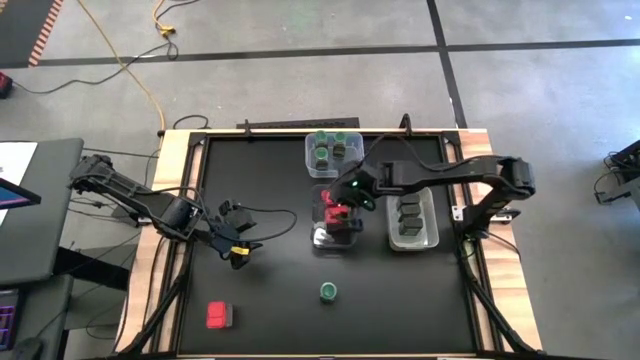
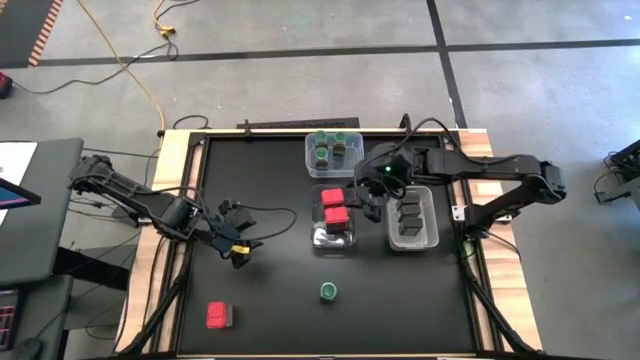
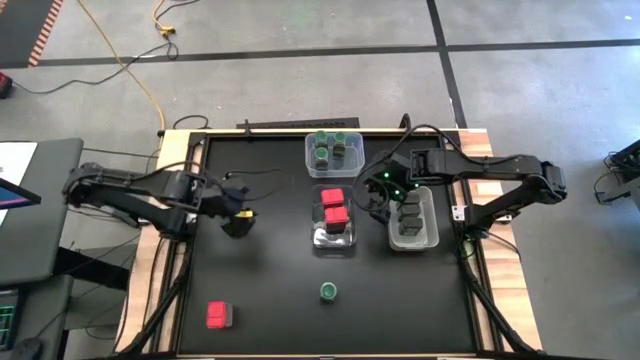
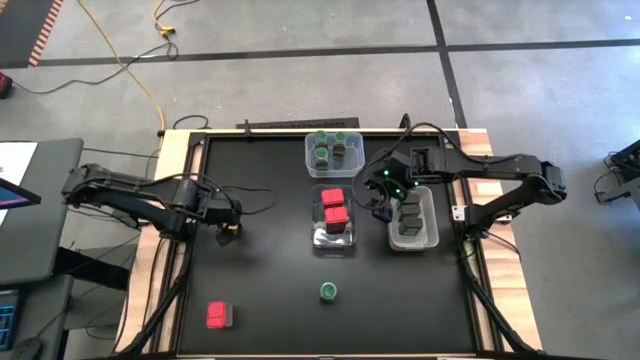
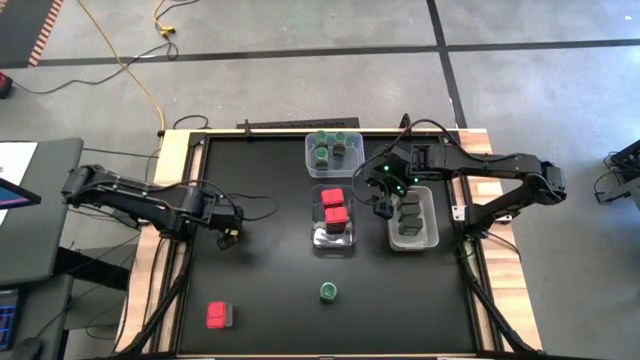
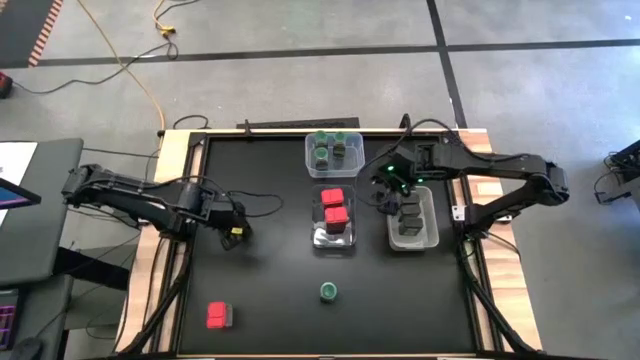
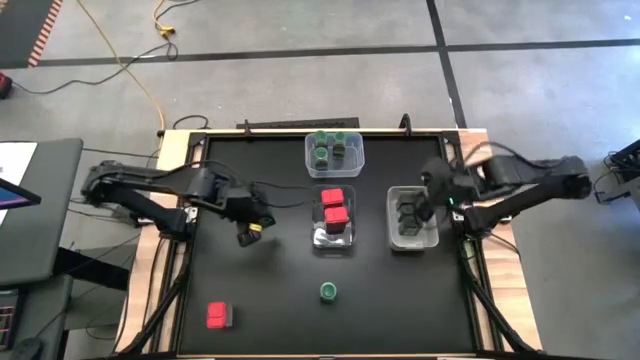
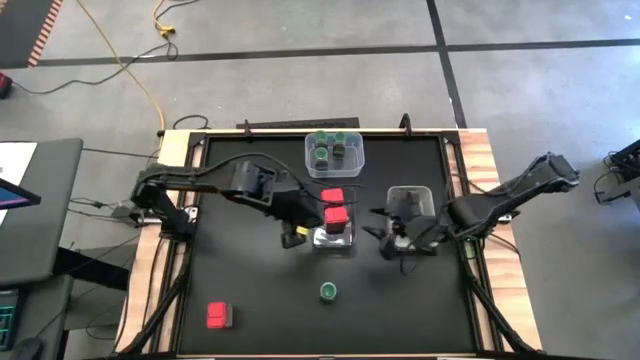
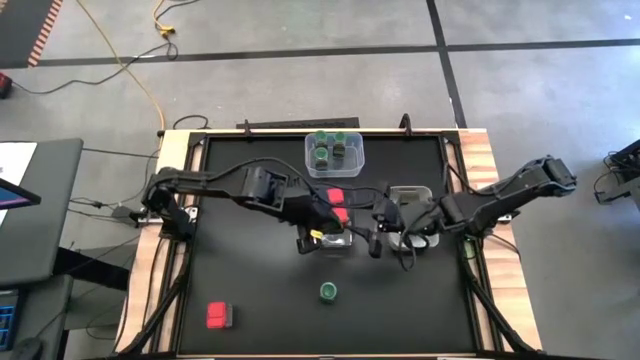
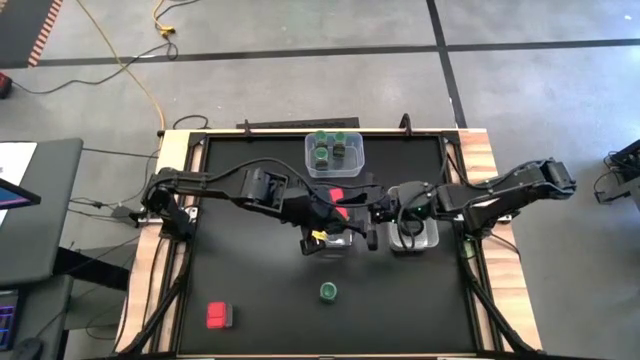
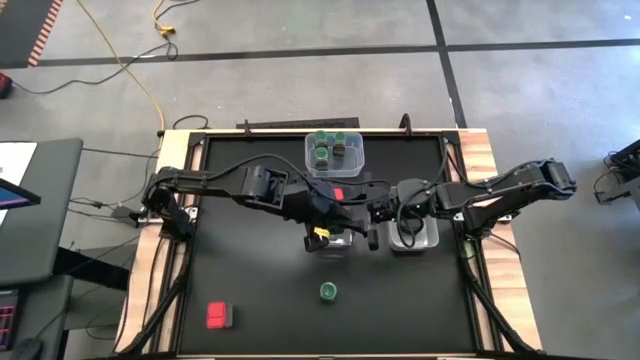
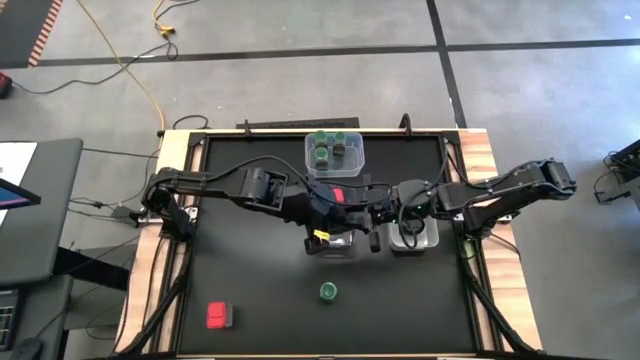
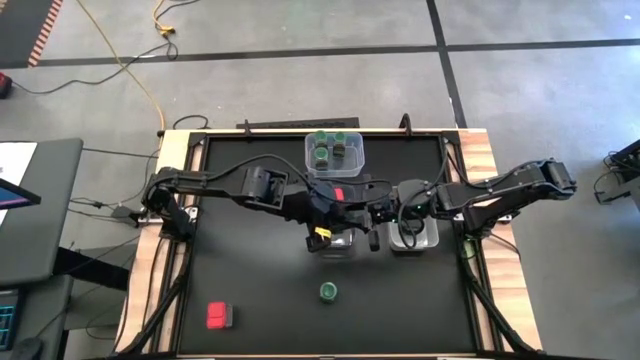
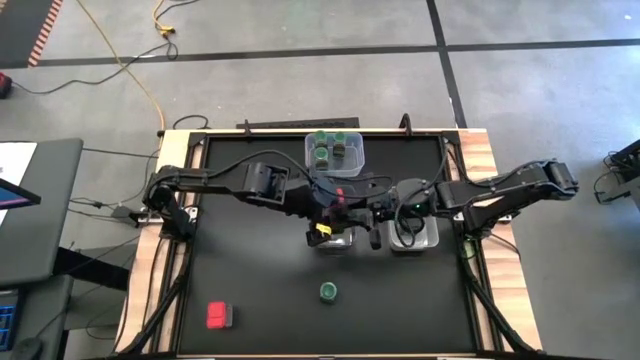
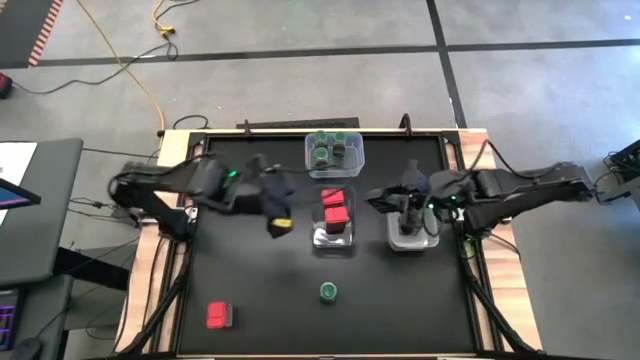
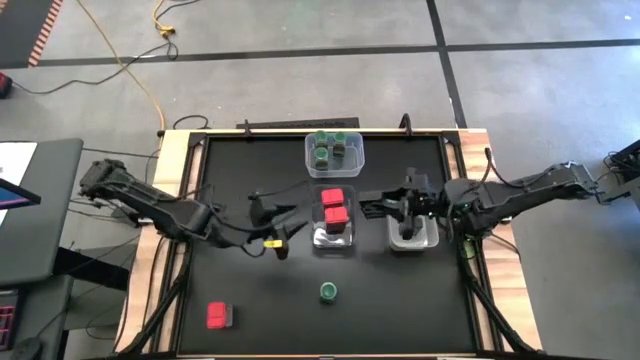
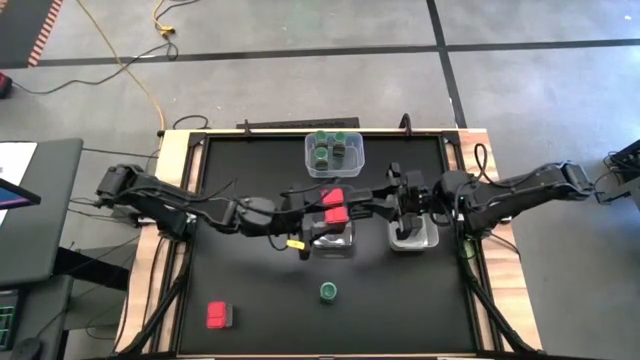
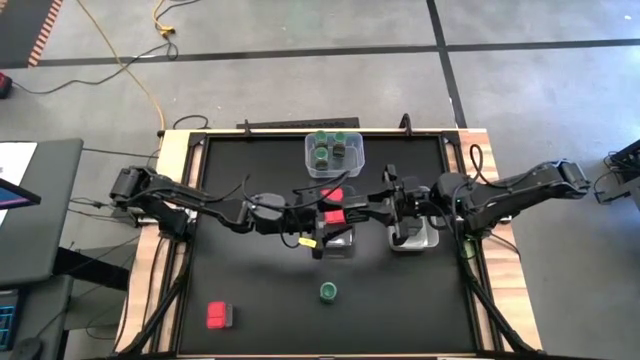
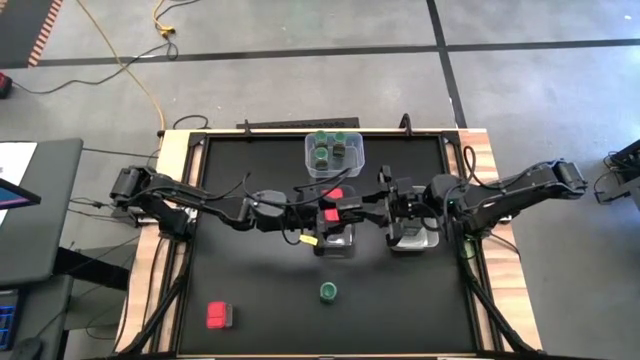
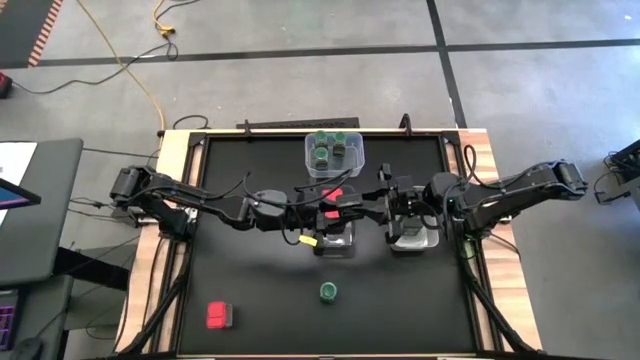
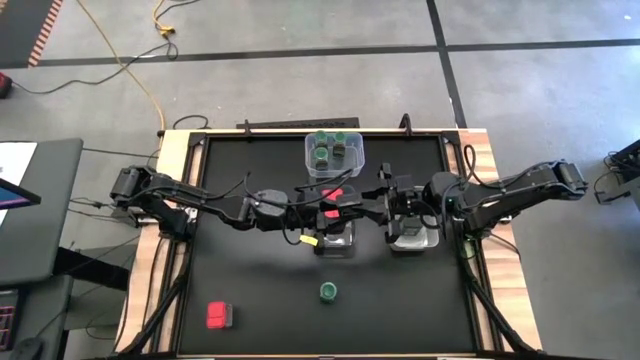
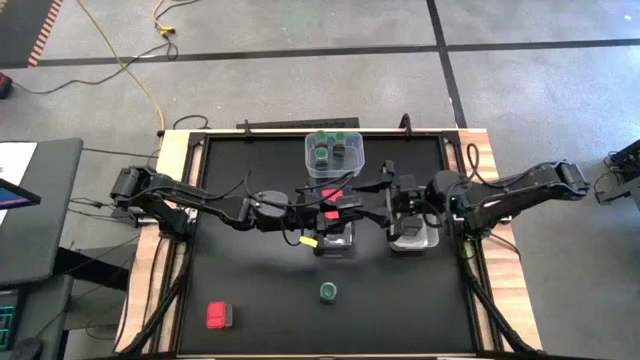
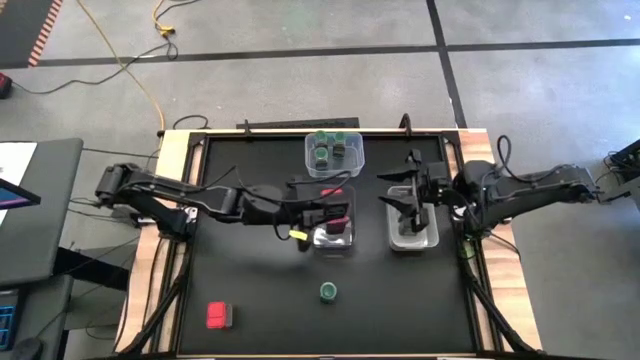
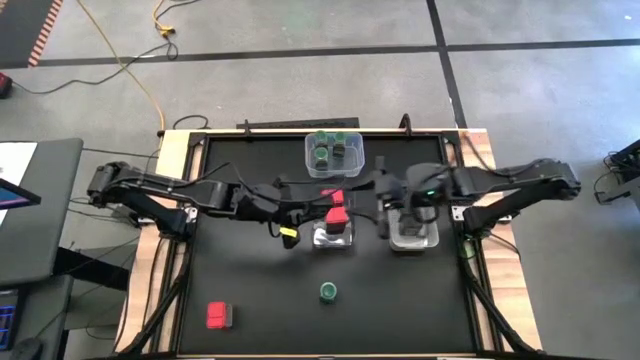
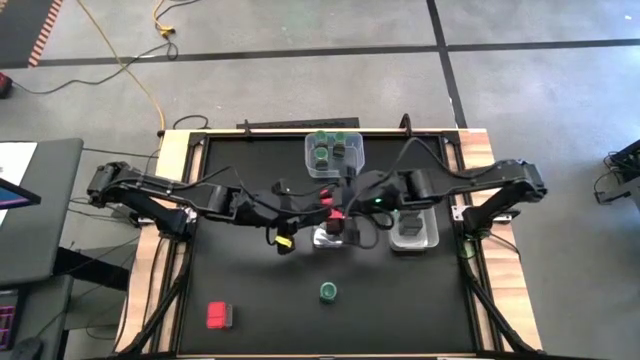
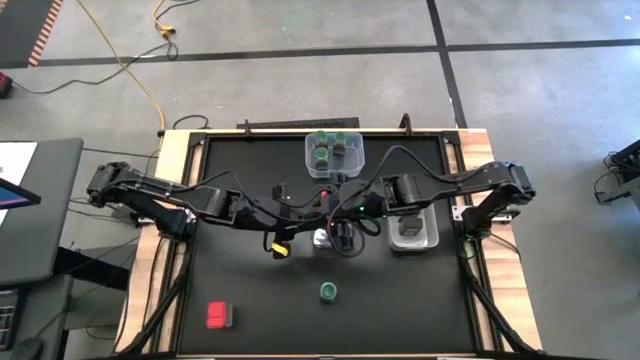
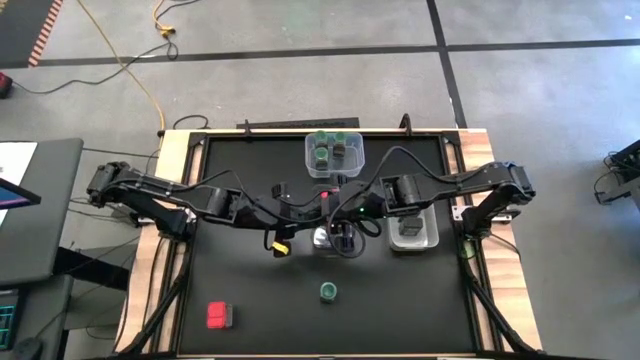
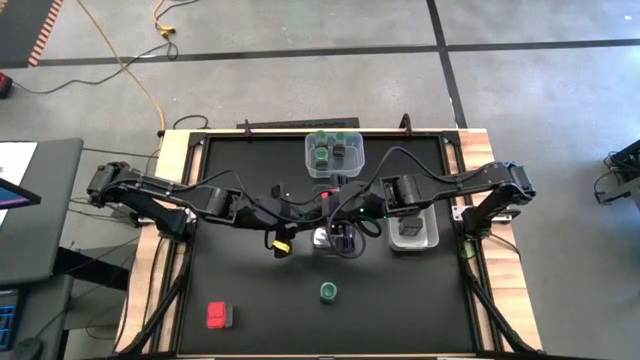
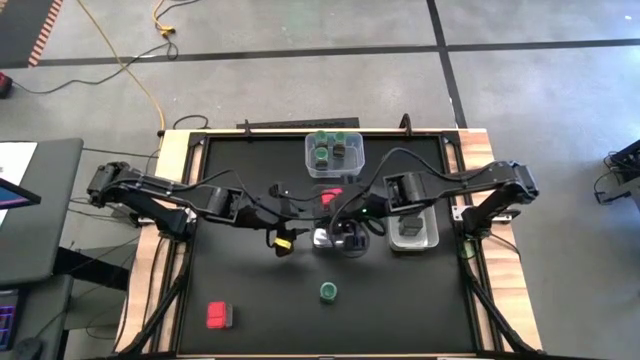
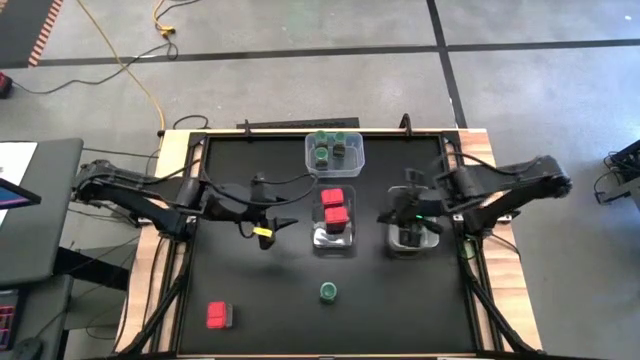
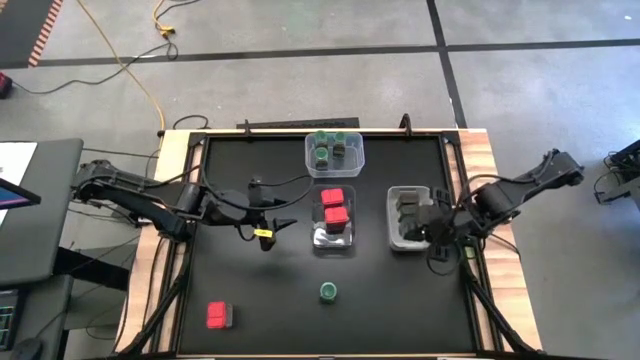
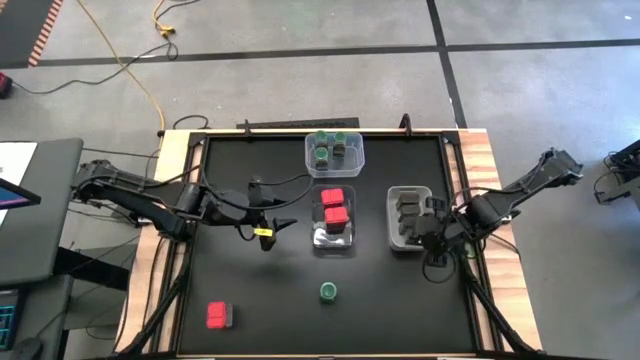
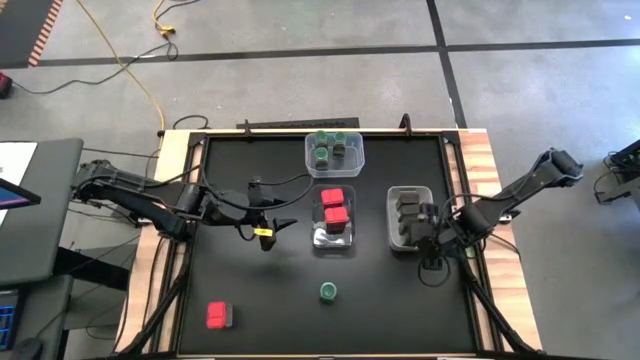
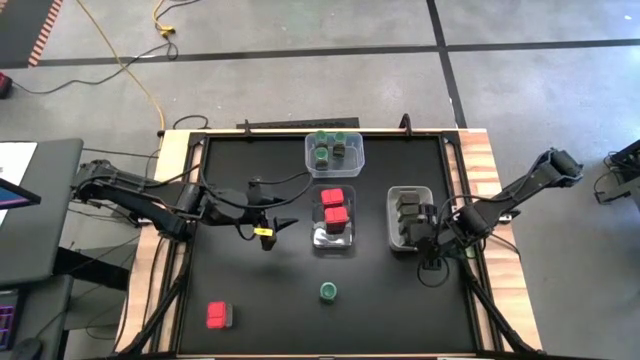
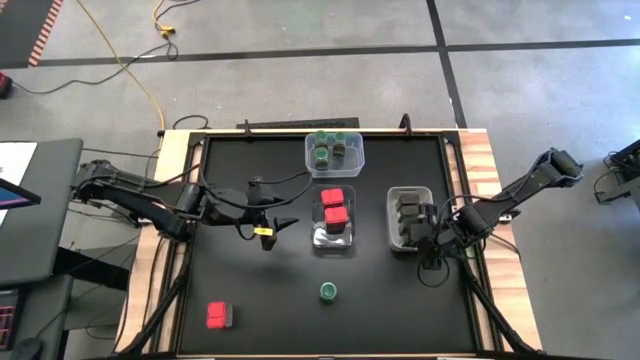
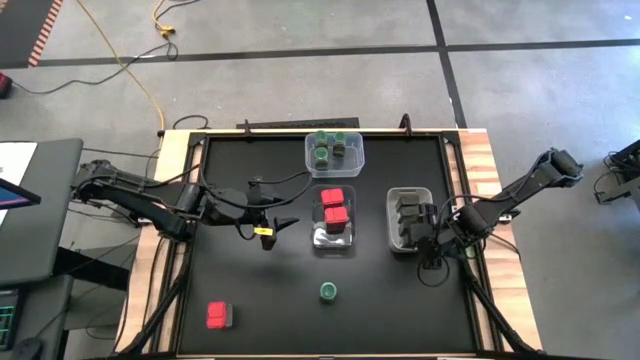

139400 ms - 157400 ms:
Task: Sort spices by type
Put the black seasoning can into the gray bin

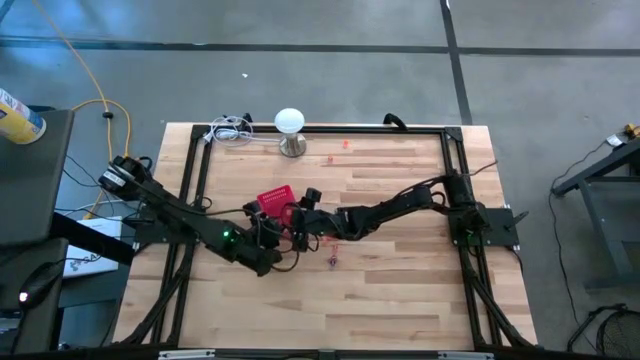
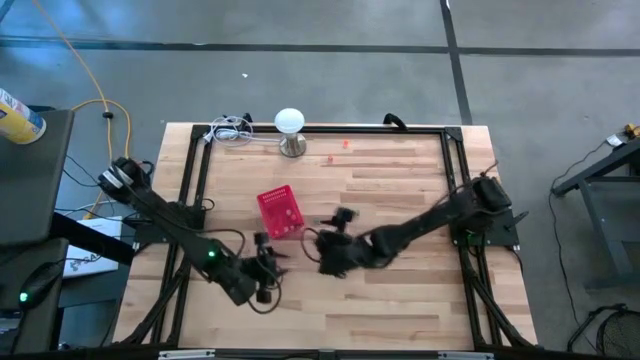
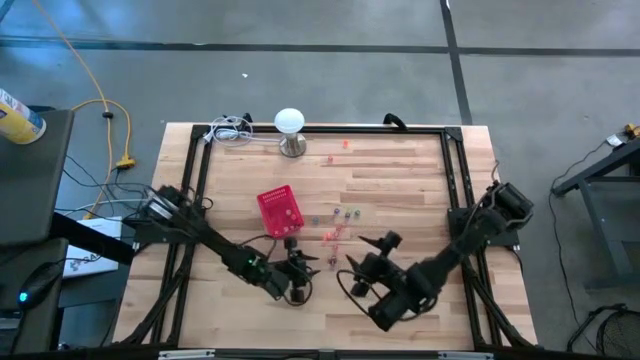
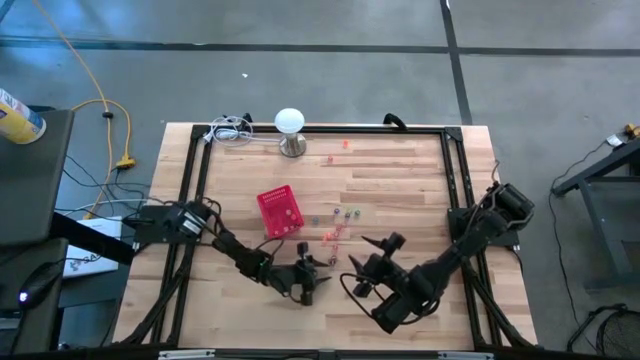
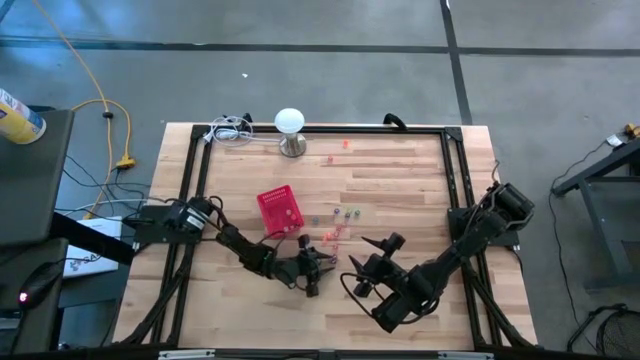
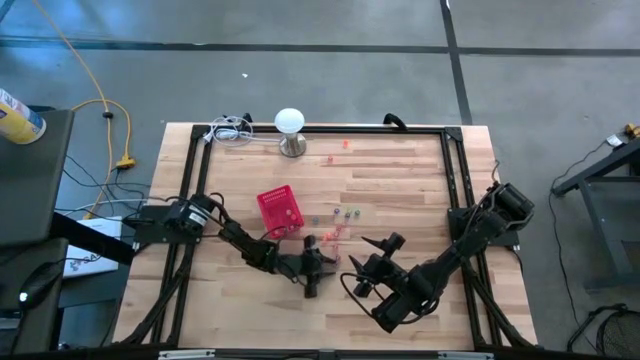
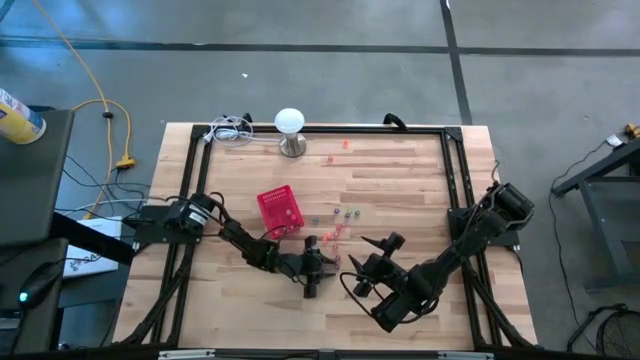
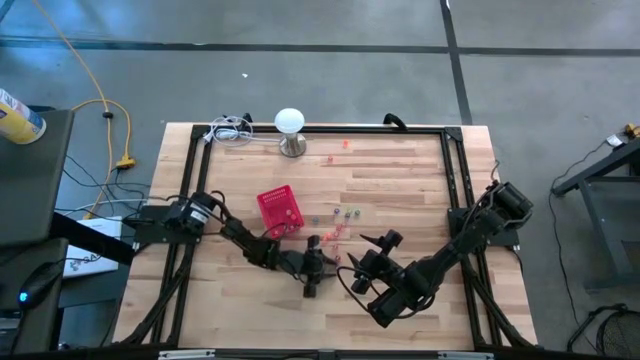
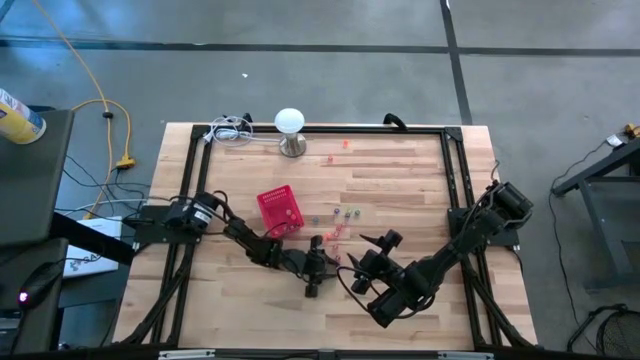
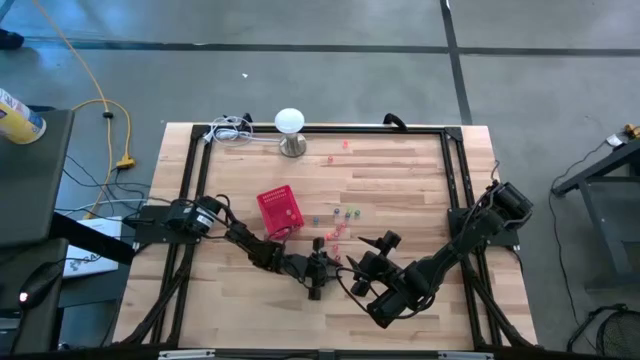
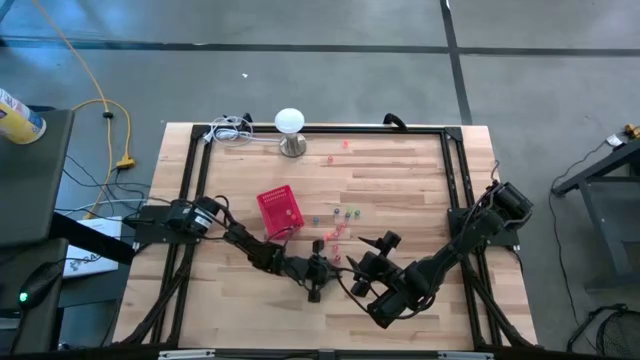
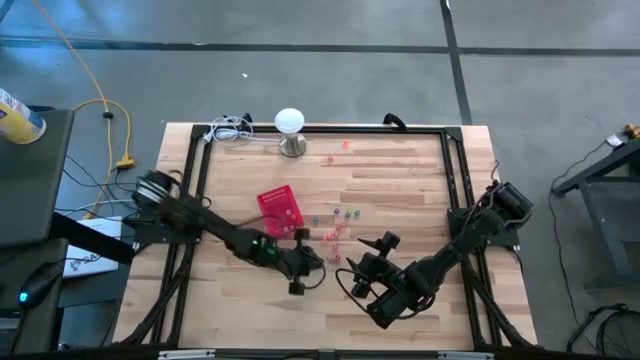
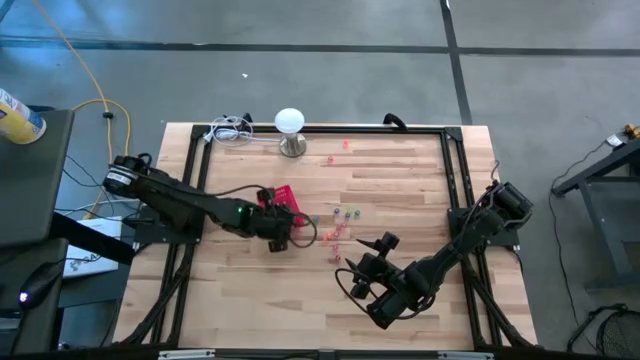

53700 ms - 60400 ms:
Task: Pick & Place Dice
Put the dark blue die into the red basket
